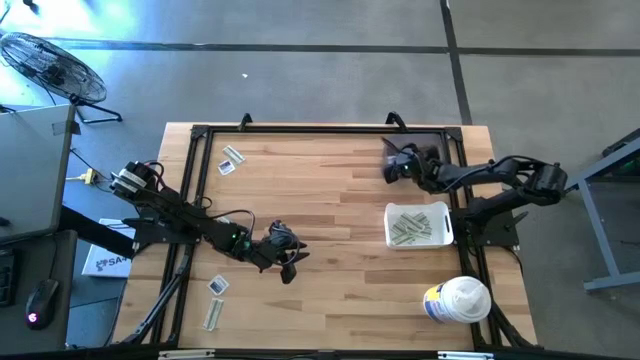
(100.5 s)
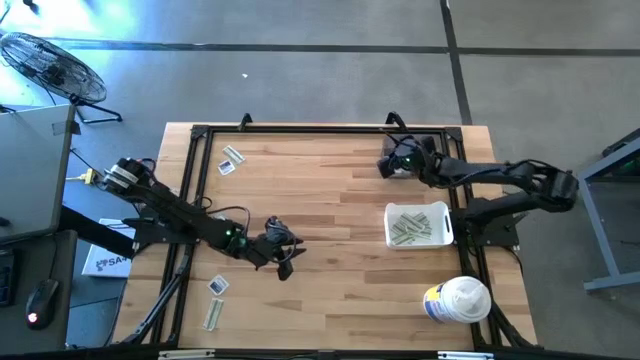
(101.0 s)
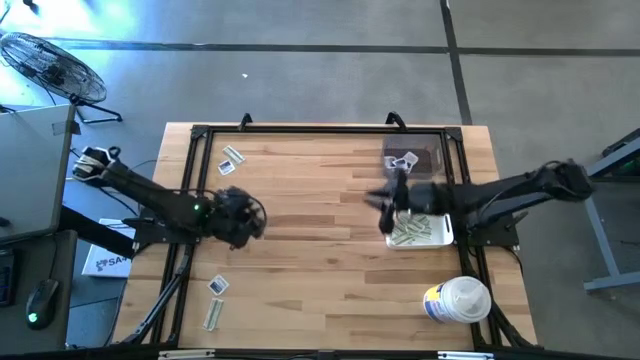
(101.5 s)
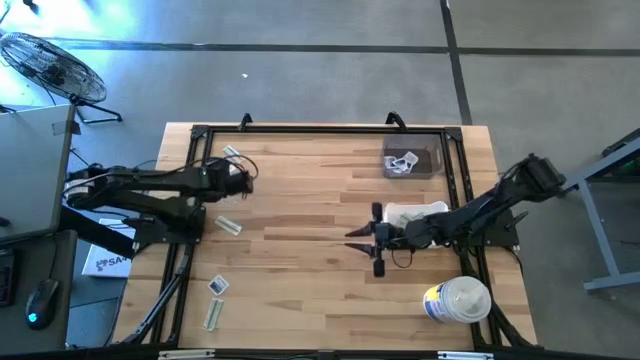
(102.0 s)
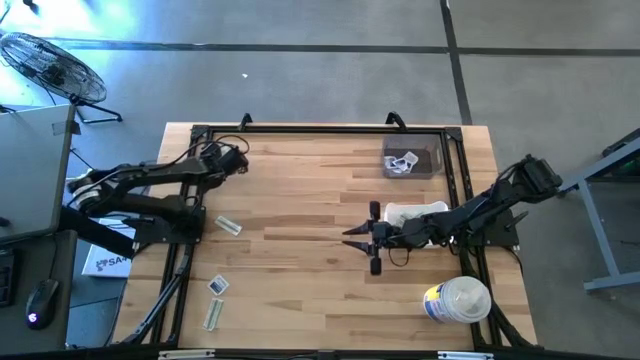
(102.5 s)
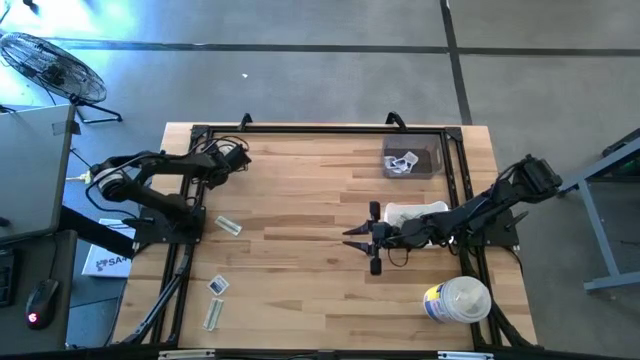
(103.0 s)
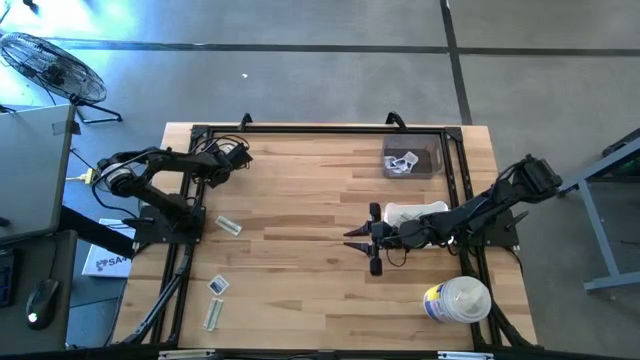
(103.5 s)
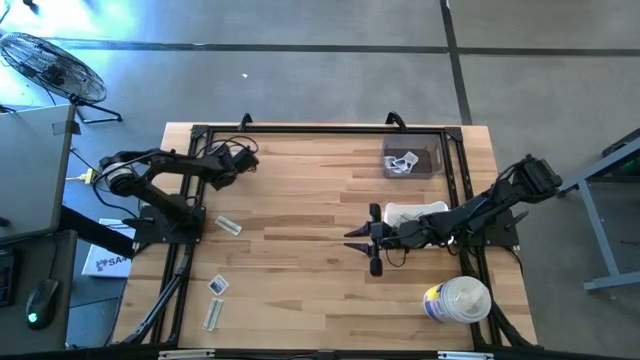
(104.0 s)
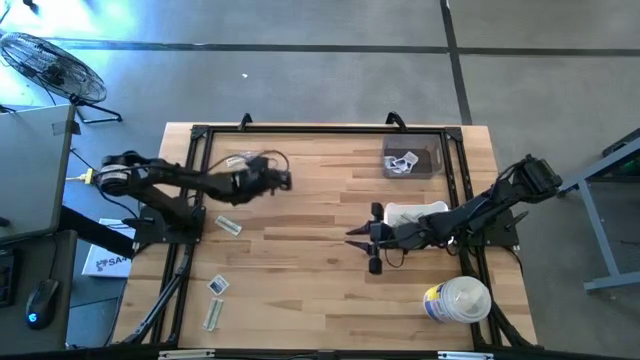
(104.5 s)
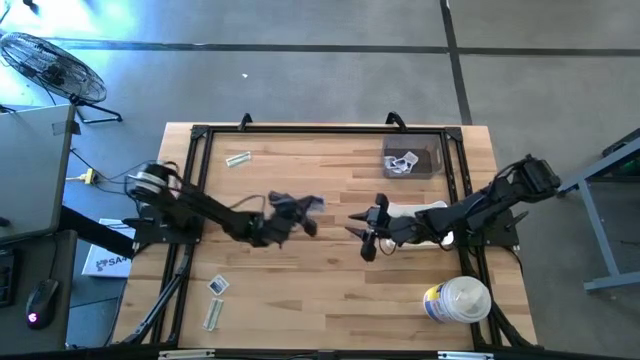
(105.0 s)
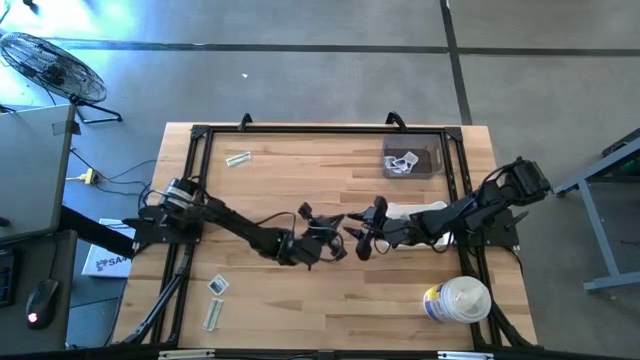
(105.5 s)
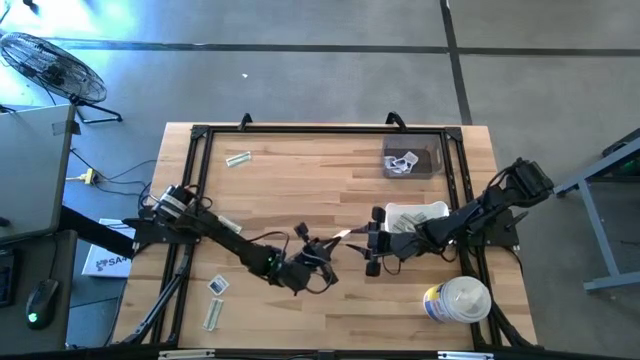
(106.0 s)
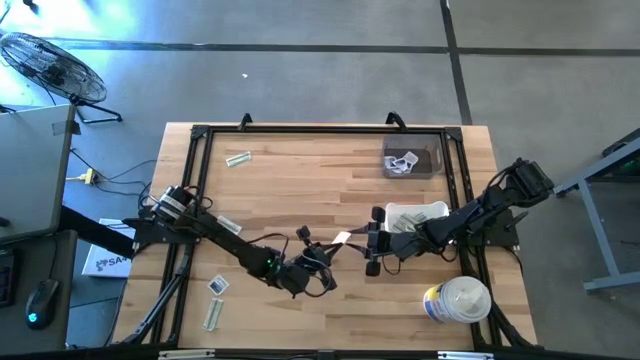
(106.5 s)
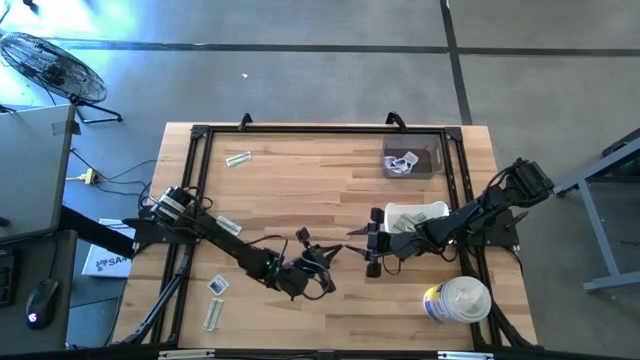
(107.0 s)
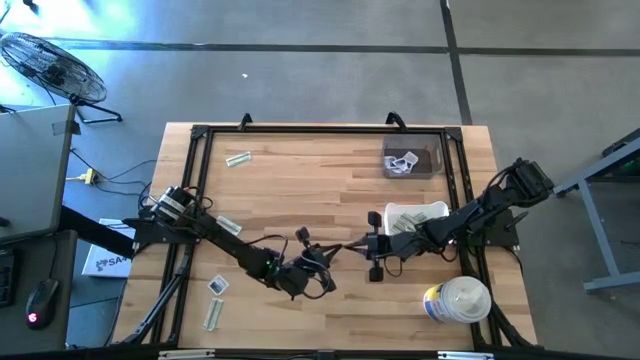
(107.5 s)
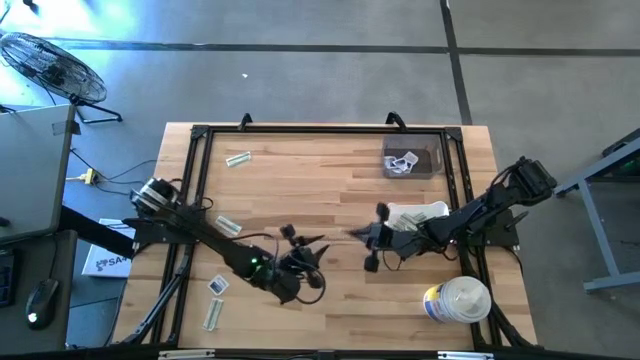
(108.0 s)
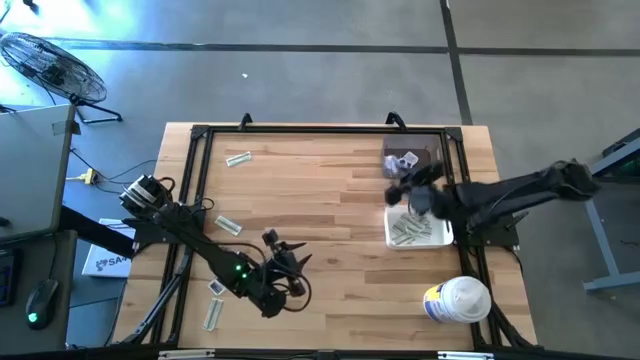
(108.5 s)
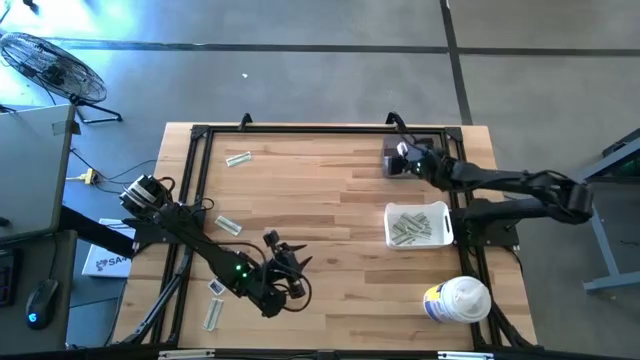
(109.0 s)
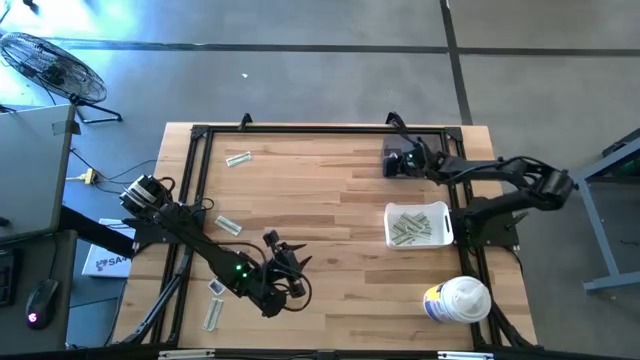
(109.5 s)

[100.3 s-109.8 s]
Task: Pick & Place First Aid Supplies
Put the alcohol pad into the black bin

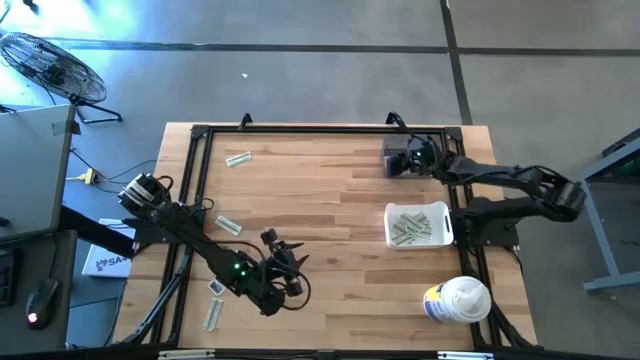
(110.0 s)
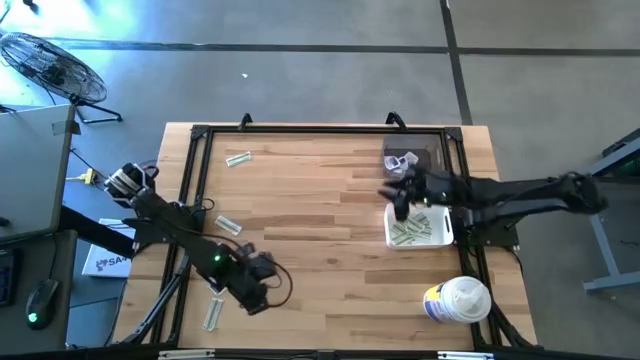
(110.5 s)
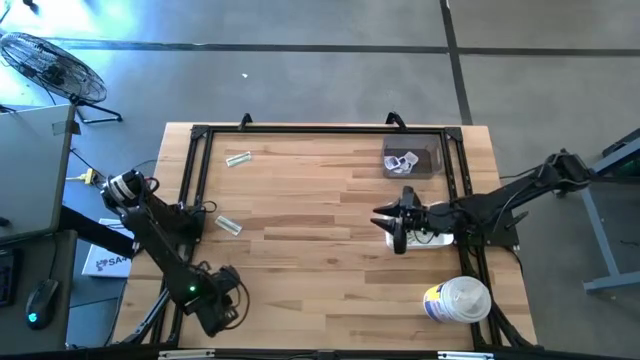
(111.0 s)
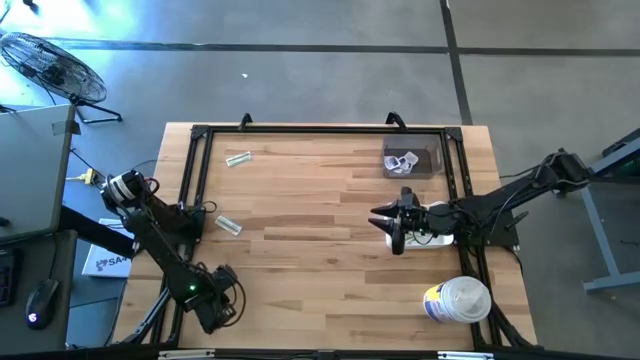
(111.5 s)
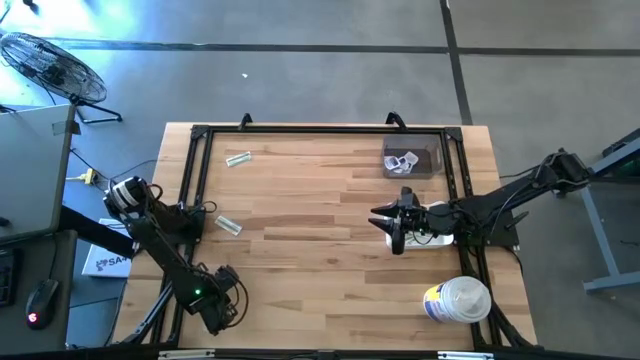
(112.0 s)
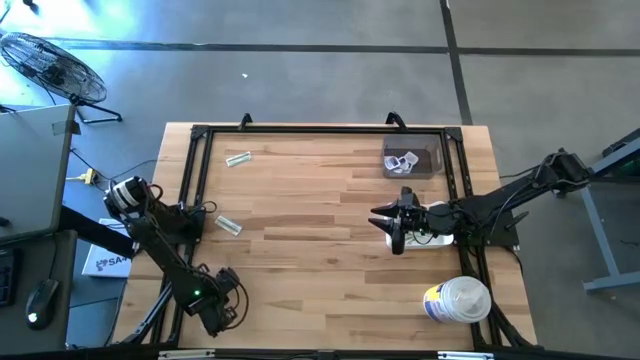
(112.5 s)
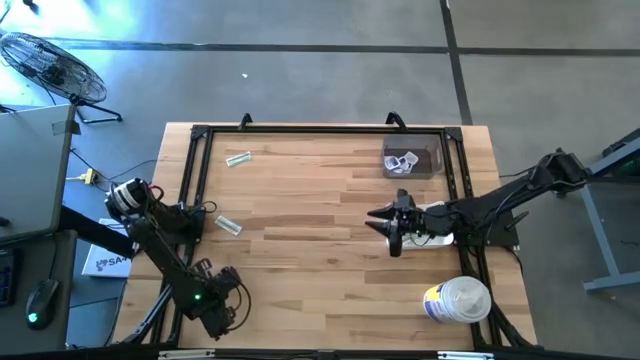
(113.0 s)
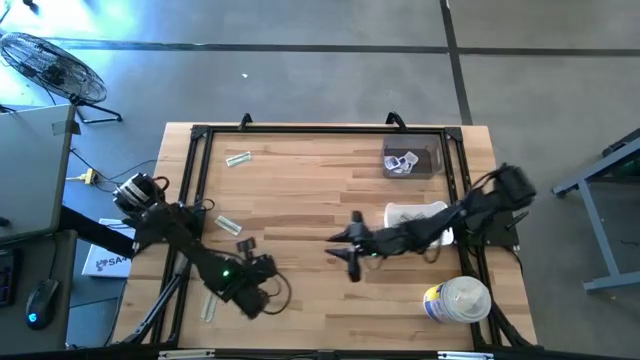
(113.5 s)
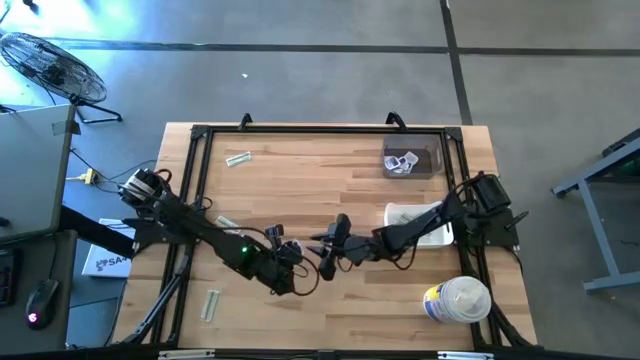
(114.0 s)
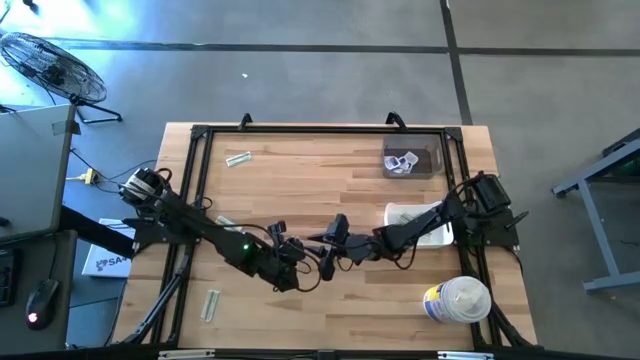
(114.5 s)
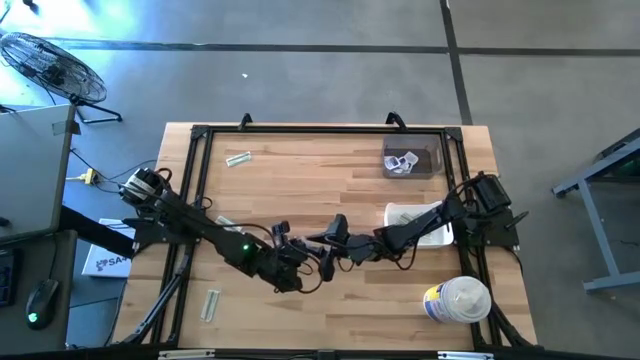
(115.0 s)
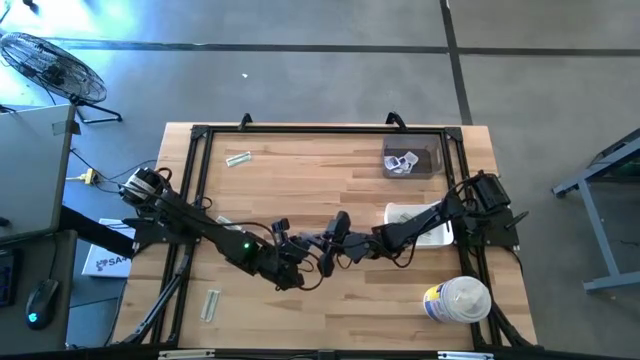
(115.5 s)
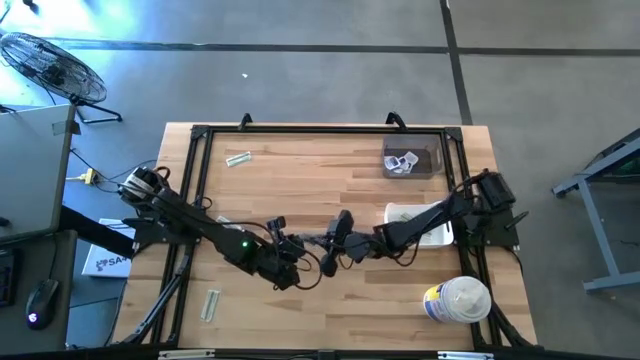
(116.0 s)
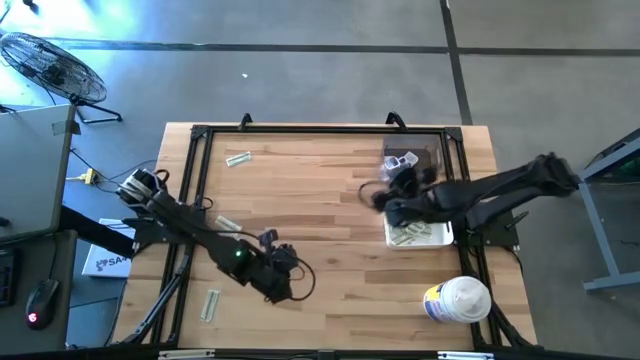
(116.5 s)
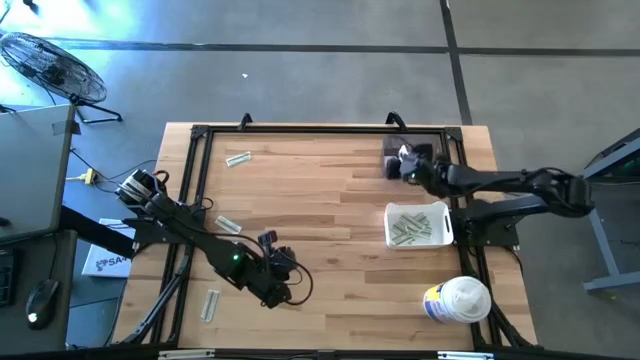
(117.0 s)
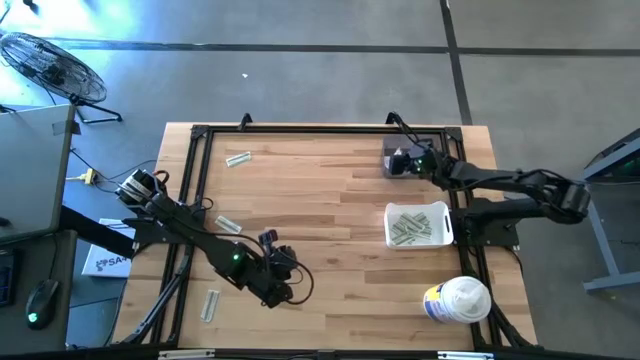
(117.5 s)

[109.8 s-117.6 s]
Put the alcohol pad into the black bin

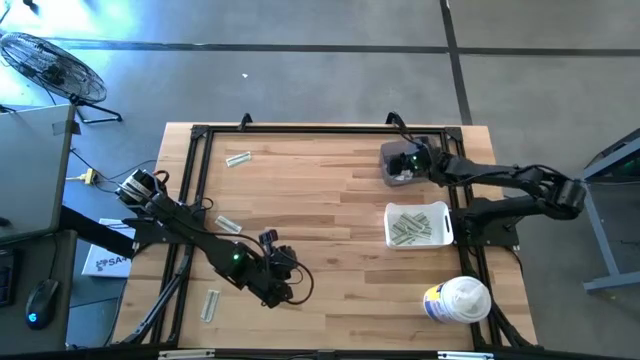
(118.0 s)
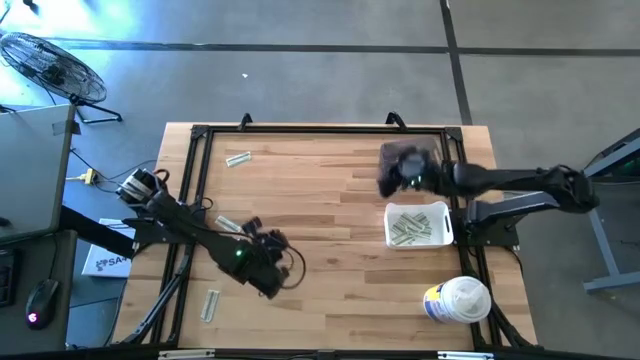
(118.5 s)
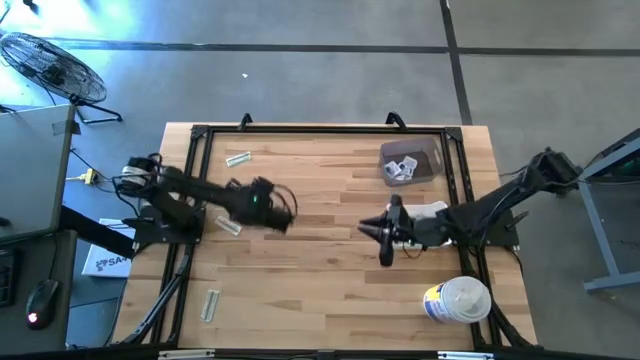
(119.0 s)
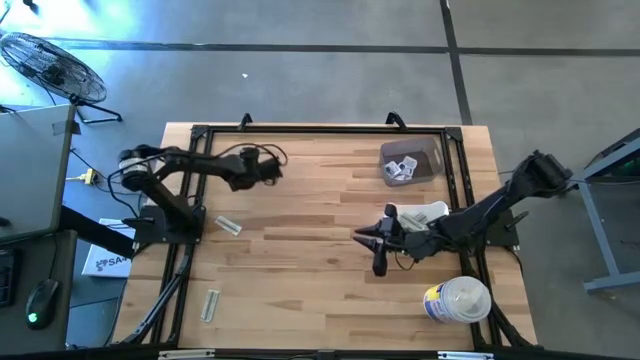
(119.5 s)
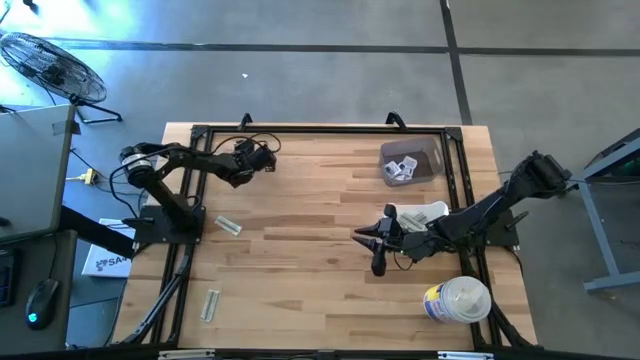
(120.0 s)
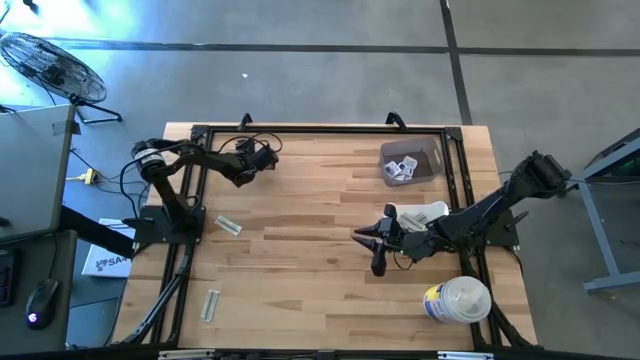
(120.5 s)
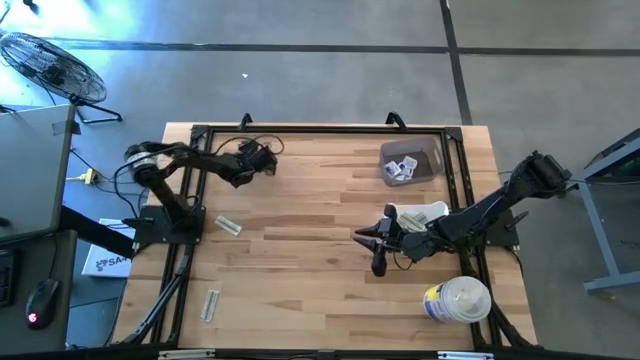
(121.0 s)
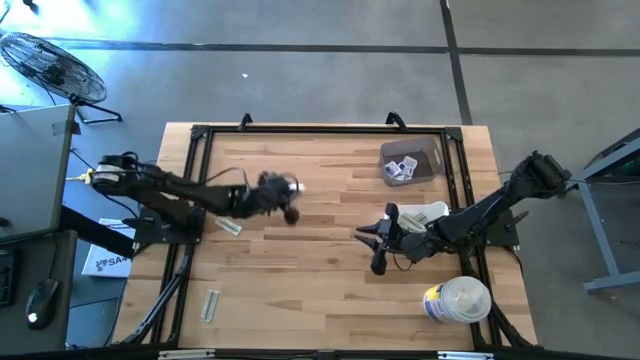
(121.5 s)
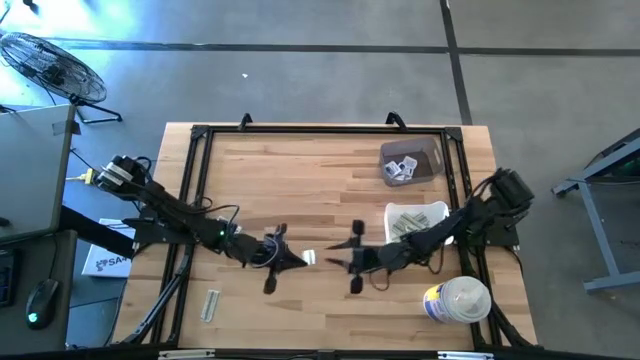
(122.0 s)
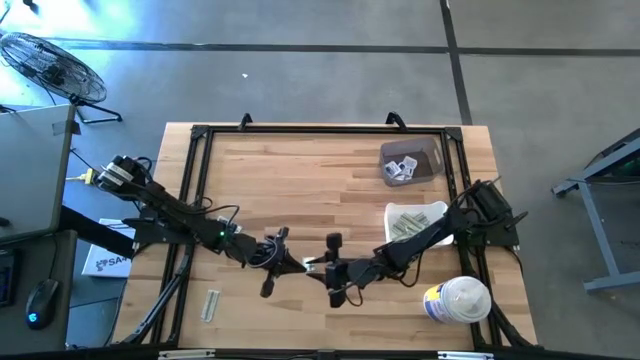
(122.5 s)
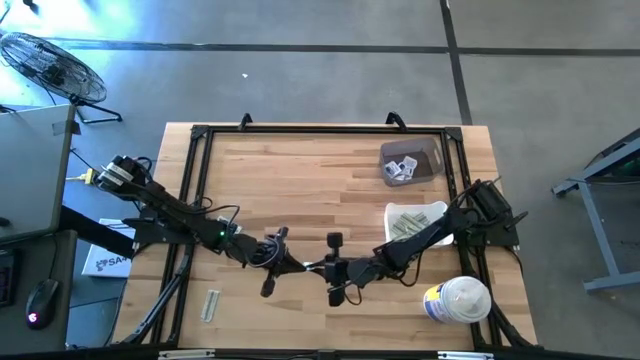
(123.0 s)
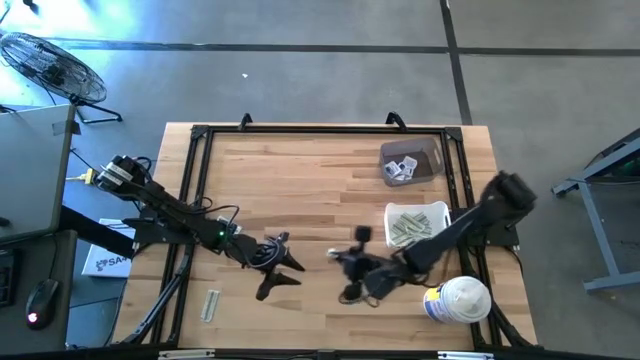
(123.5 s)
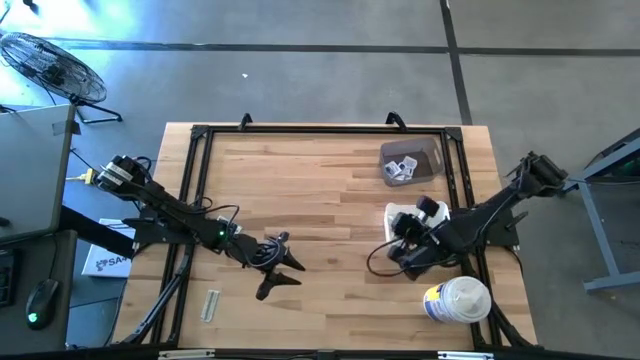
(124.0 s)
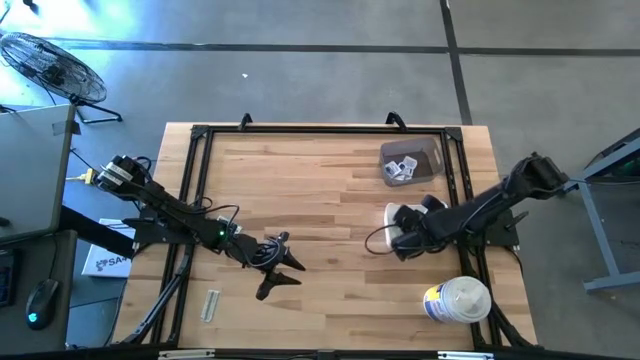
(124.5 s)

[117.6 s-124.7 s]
Put the bandage into the white bin
